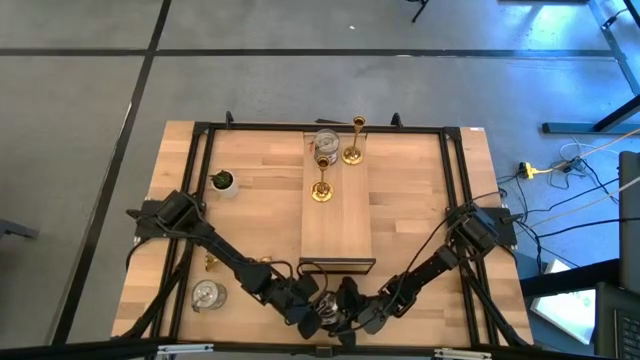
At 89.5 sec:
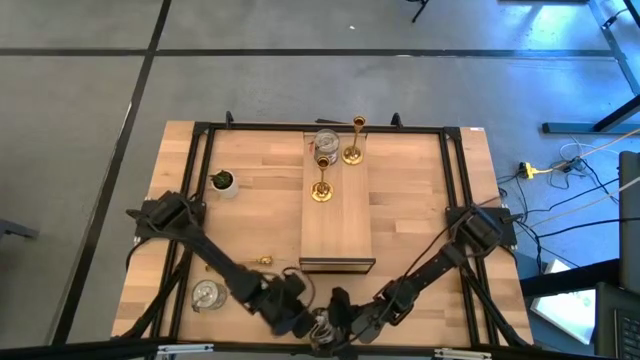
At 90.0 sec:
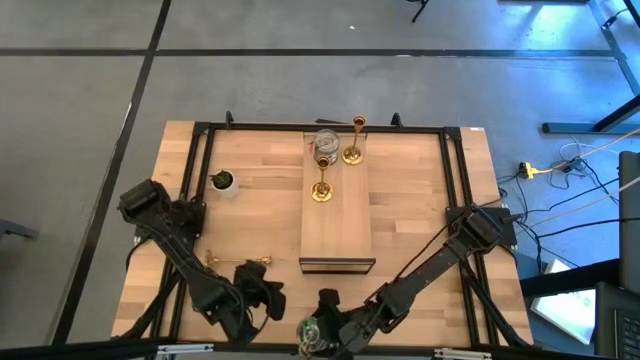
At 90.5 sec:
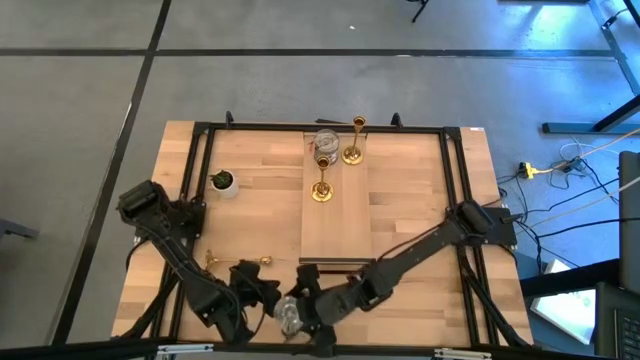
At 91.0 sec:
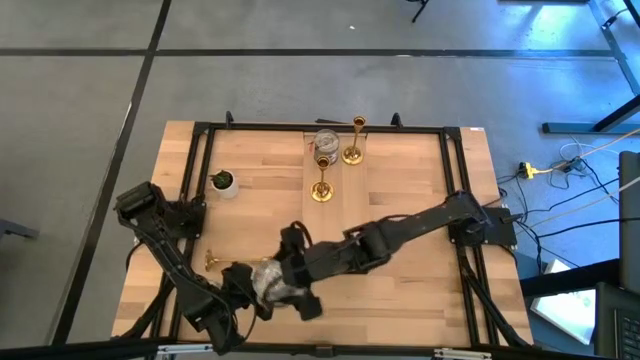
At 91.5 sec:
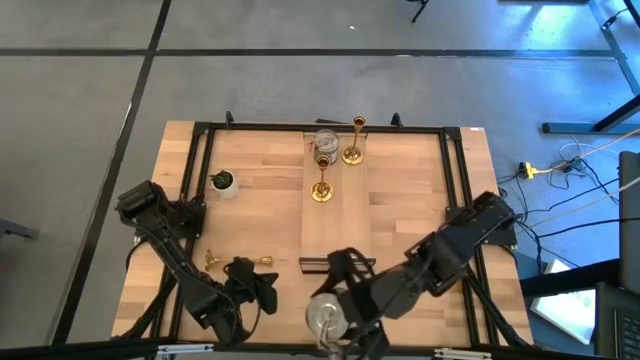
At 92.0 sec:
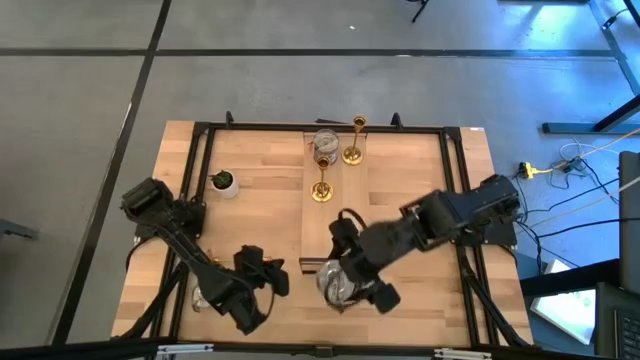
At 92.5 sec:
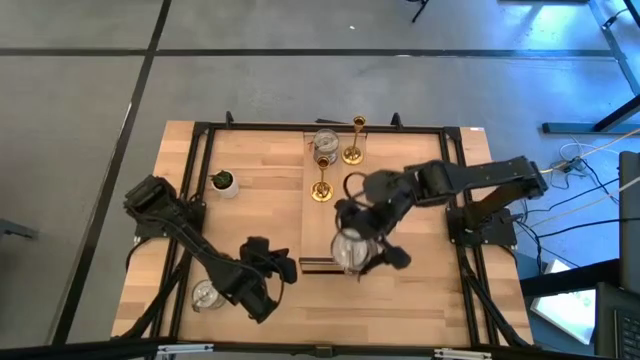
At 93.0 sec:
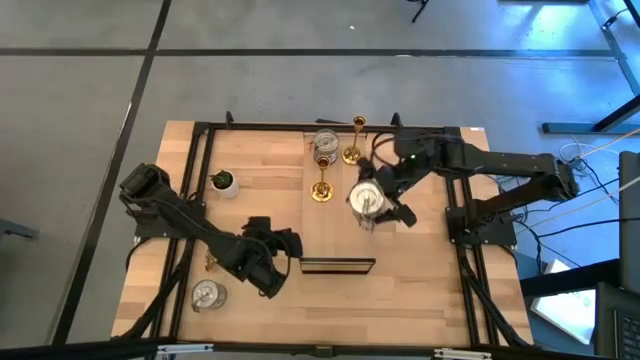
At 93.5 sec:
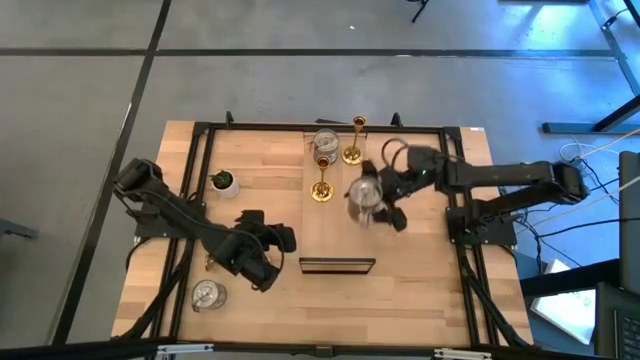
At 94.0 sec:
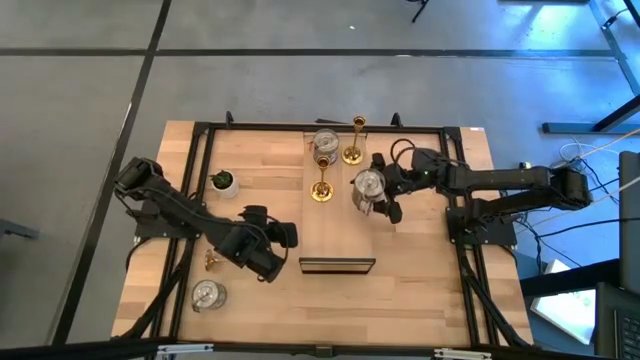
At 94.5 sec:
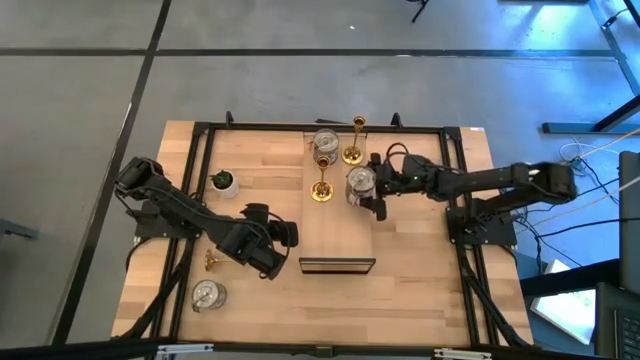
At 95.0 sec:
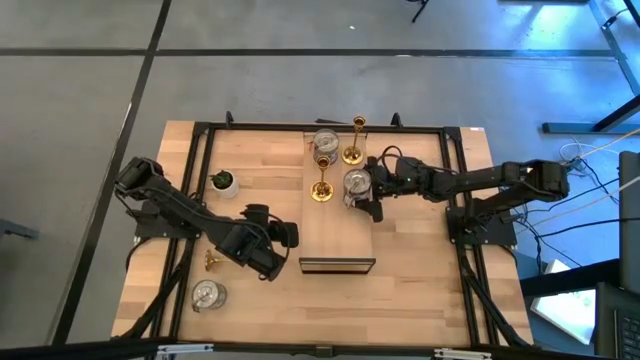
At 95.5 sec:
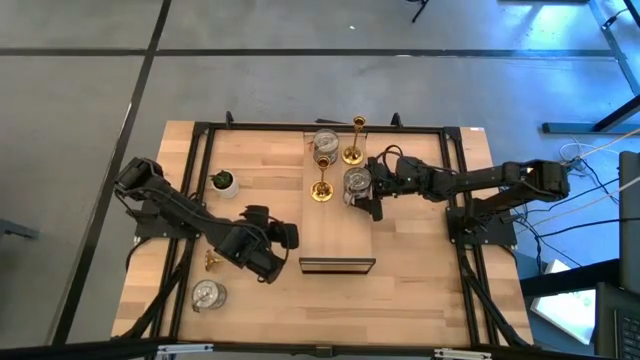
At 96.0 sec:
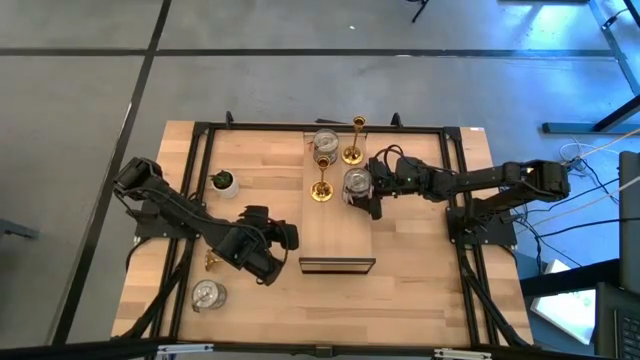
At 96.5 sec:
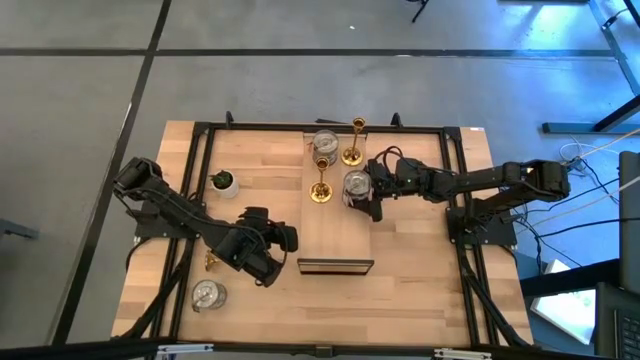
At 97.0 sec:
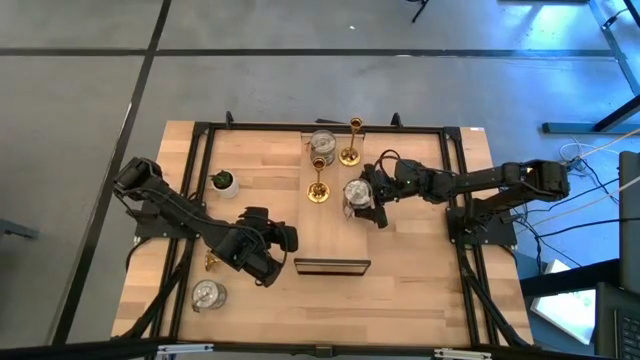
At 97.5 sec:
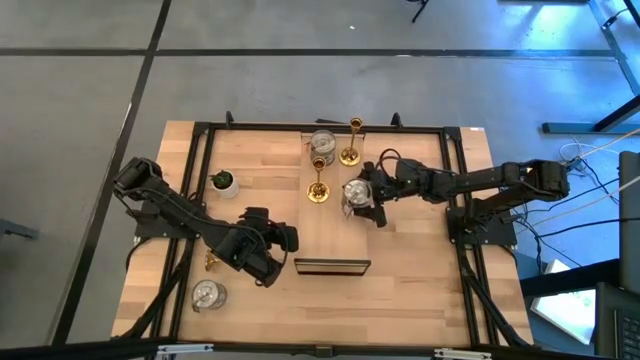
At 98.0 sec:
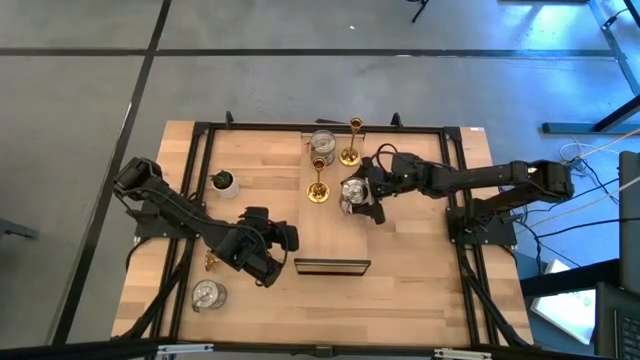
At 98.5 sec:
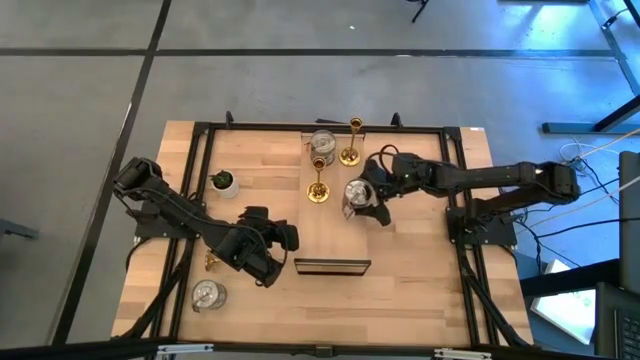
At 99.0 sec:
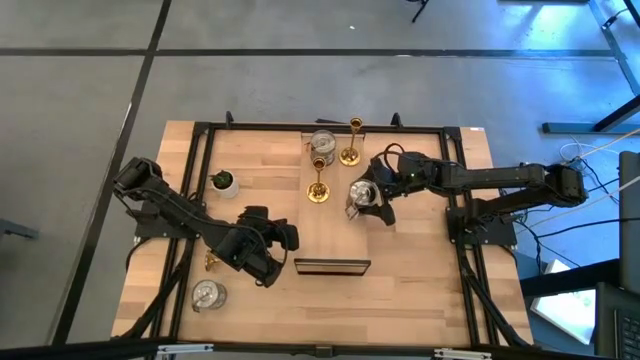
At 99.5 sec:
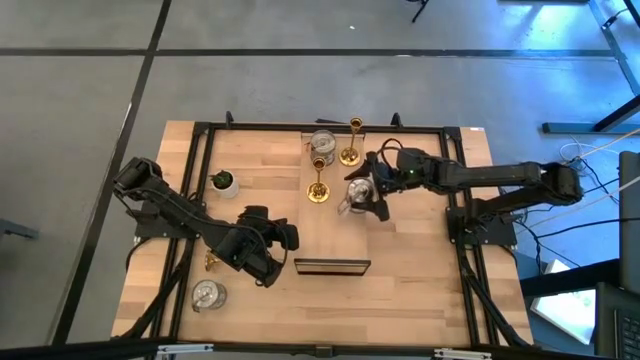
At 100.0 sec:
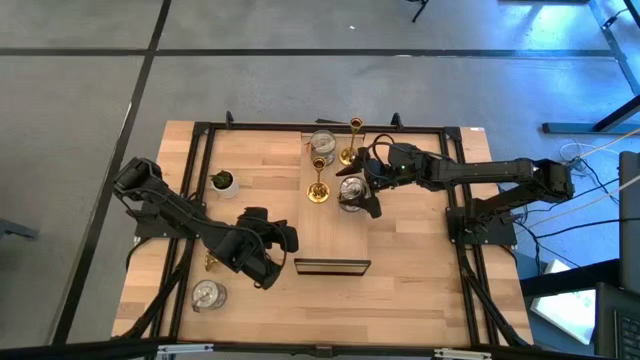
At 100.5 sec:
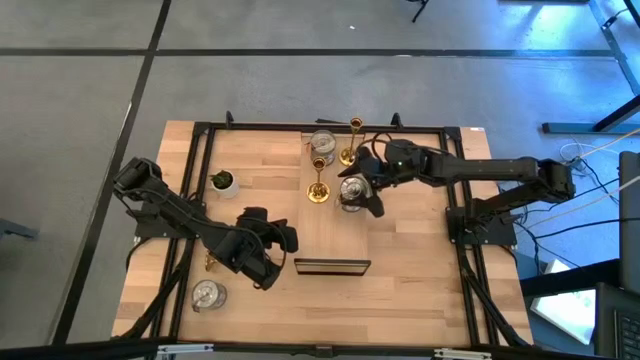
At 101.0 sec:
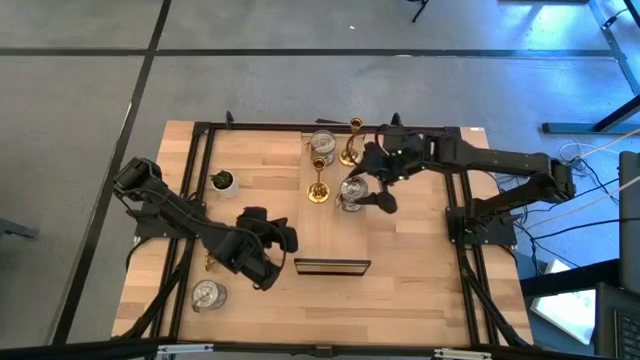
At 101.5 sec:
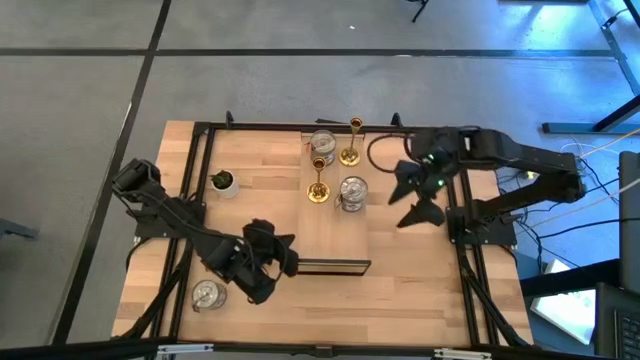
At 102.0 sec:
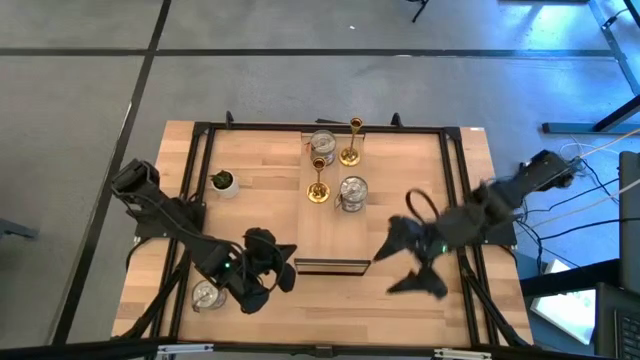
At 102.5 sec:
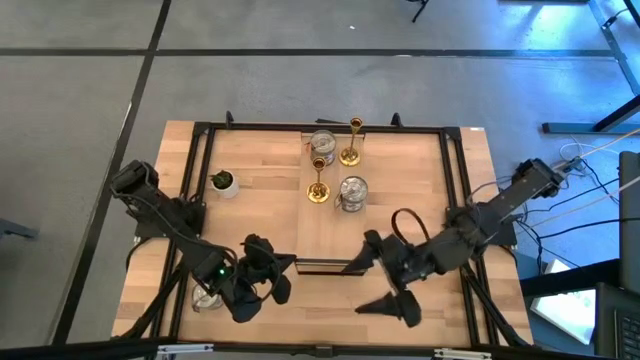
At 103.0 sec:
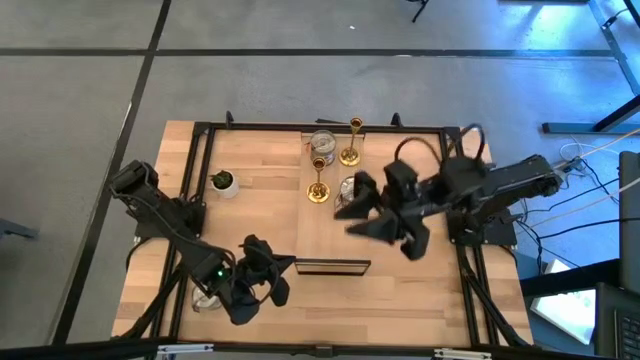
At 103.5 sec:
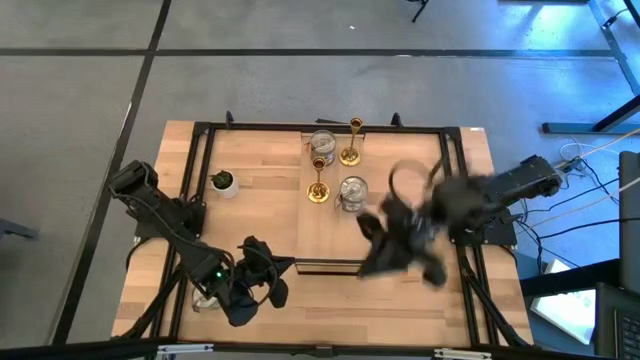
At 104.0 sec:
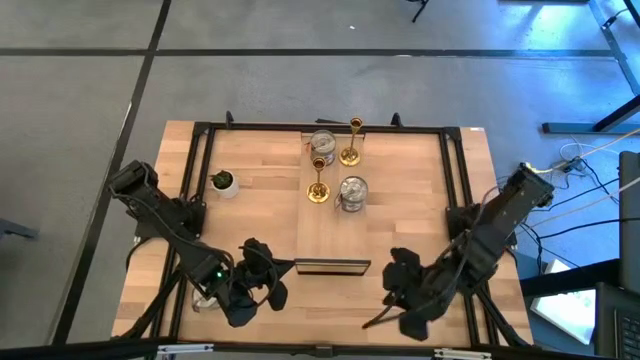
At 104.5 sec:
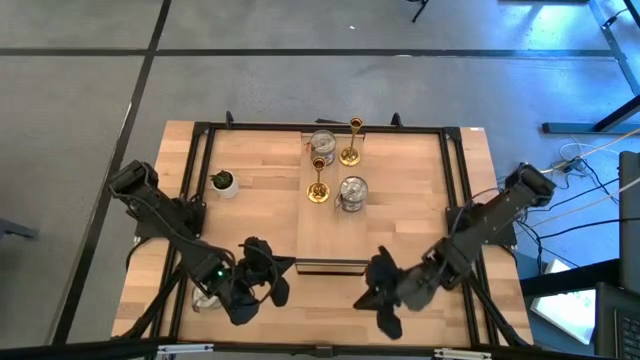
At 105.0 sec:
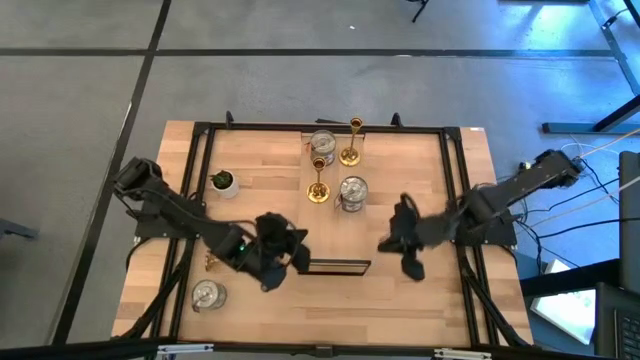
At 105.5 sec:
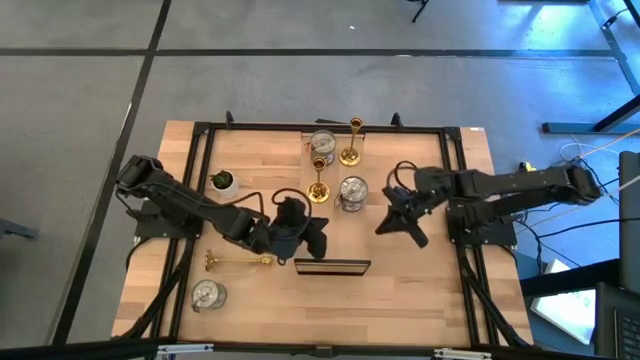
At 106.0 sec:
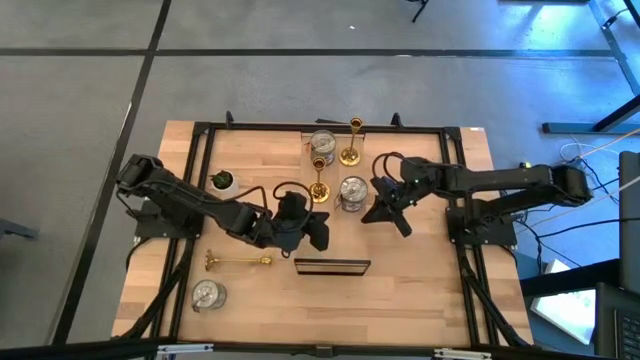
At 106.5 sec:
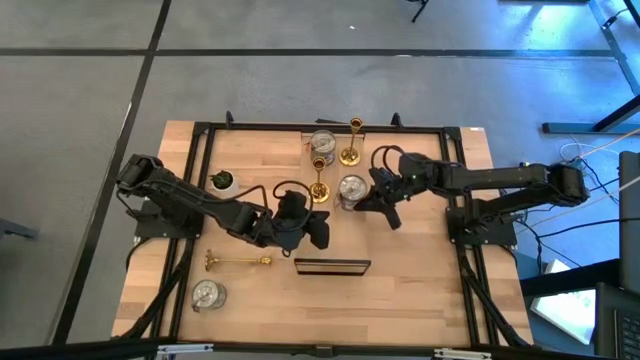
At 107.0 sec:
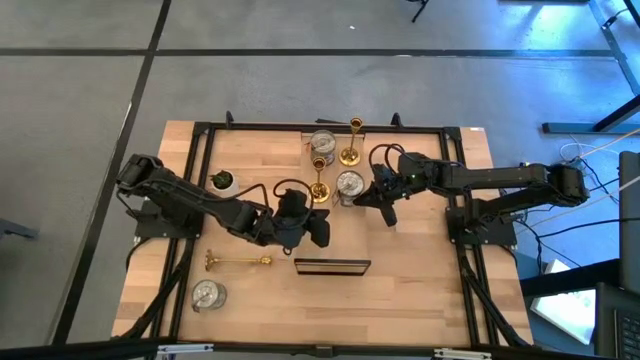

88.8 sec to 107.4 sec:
Task: Pick & Place candle stick holders
Put the right scented candle on the shelf

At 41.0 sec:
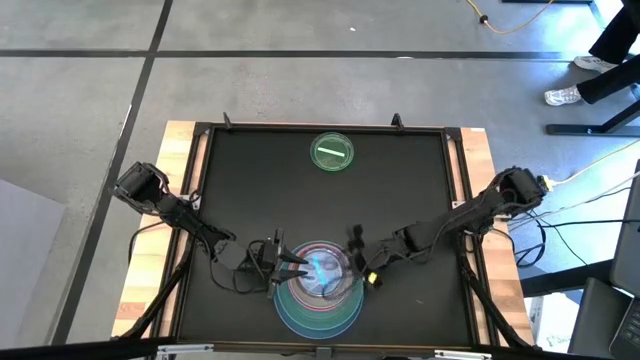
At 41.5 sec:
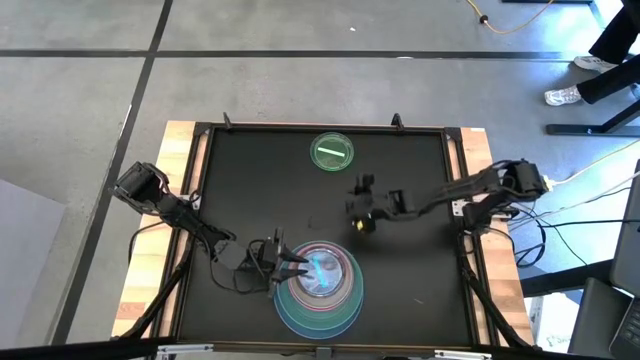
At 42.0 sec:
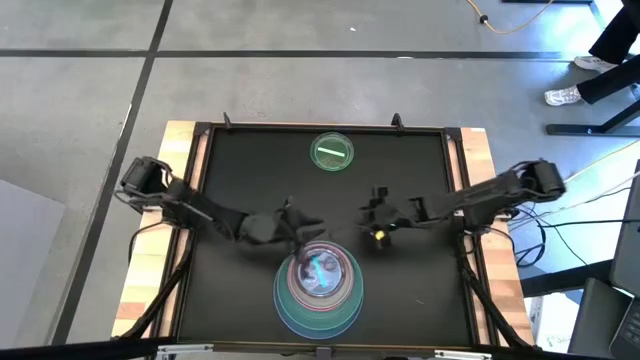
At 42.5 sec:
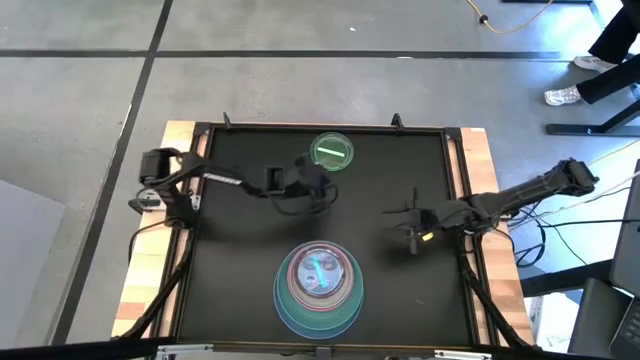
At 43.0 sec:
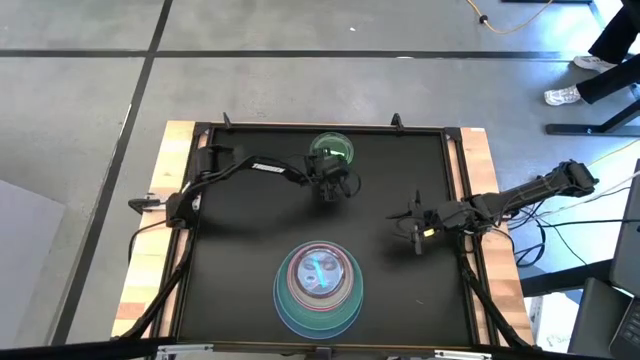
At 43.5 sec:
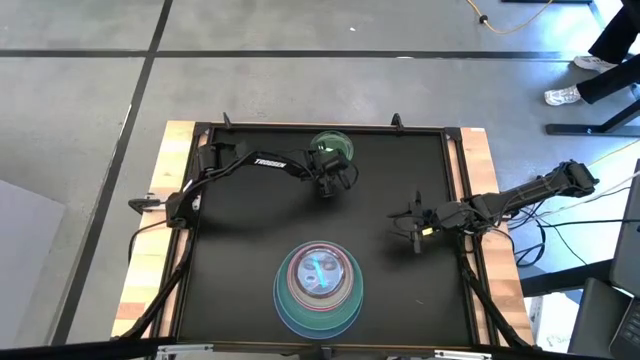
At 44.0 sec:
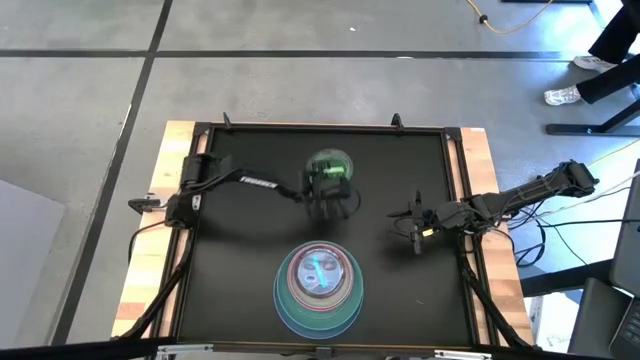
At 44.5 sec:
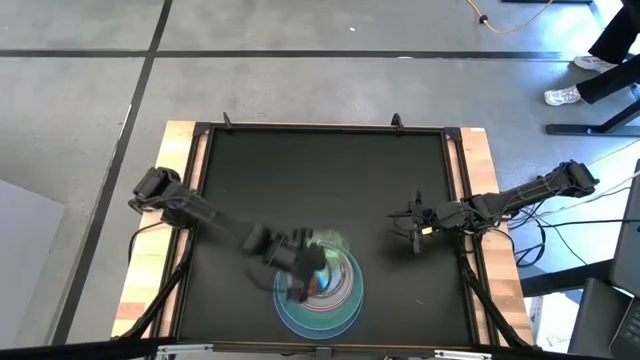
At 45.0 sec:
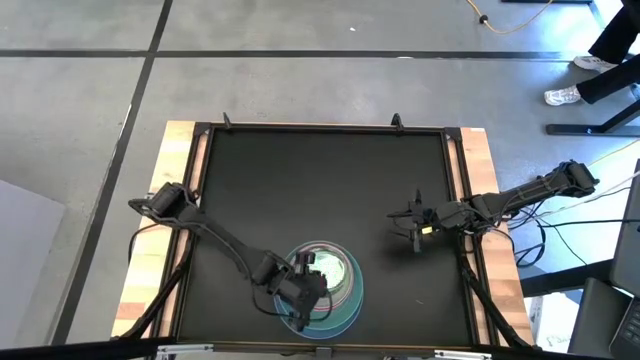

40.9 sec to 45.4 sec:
Task: Stack plastic plates
Stack the light green plate on the light blue plate
